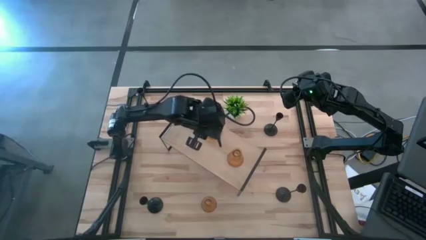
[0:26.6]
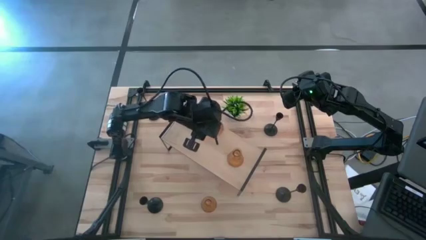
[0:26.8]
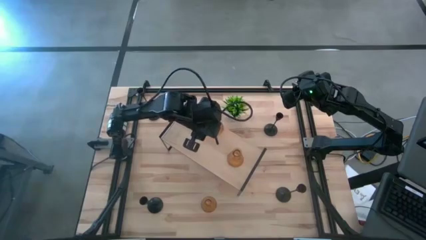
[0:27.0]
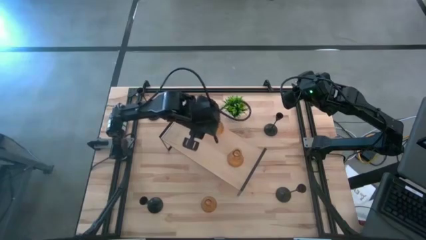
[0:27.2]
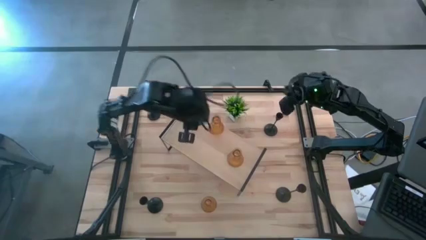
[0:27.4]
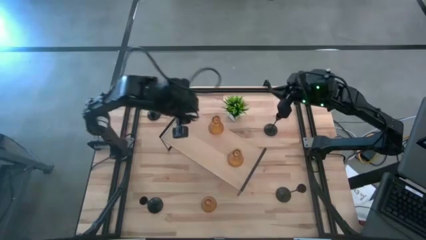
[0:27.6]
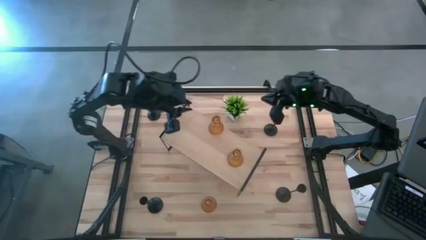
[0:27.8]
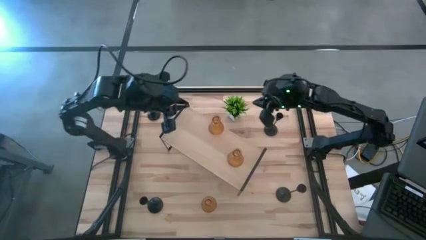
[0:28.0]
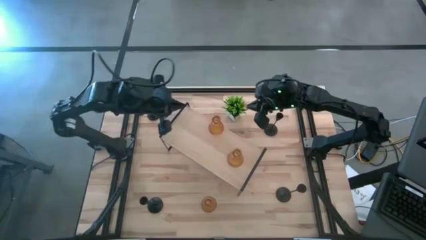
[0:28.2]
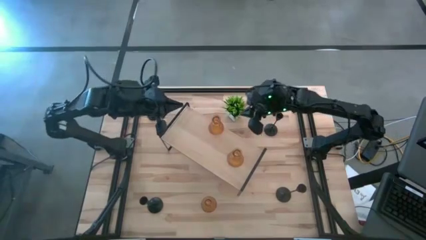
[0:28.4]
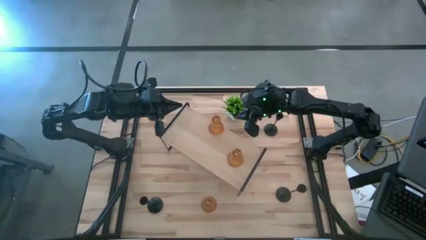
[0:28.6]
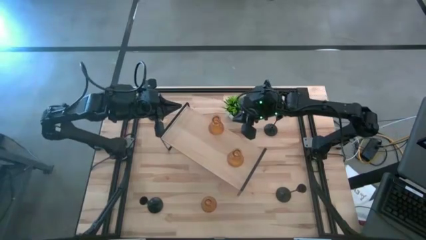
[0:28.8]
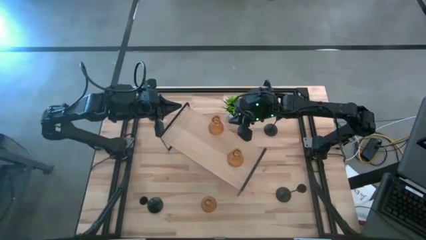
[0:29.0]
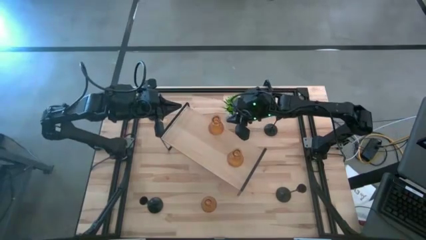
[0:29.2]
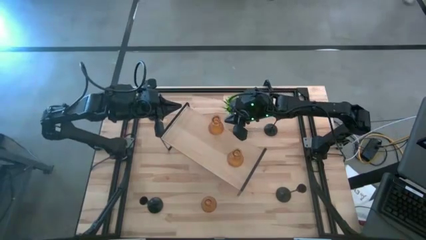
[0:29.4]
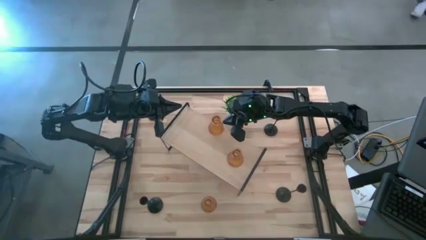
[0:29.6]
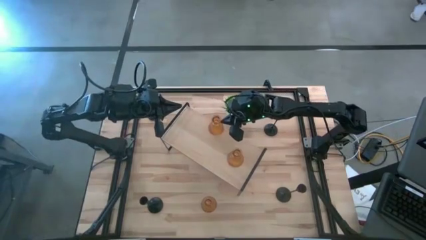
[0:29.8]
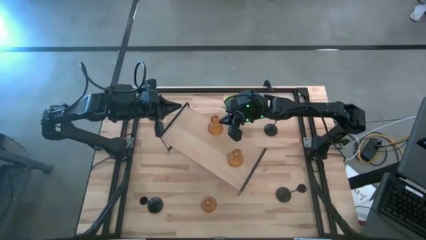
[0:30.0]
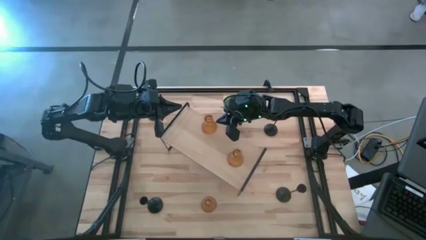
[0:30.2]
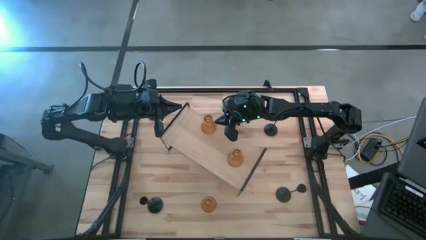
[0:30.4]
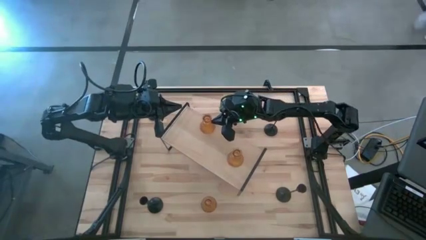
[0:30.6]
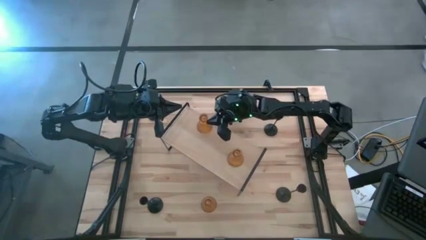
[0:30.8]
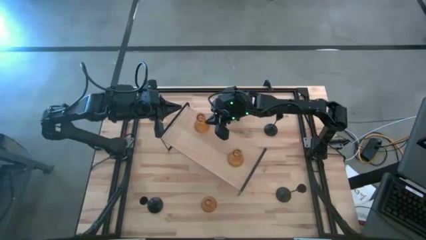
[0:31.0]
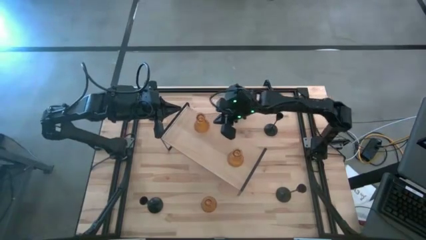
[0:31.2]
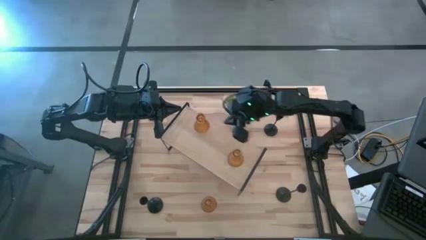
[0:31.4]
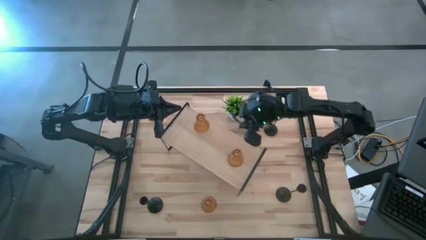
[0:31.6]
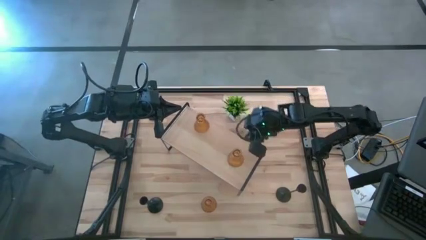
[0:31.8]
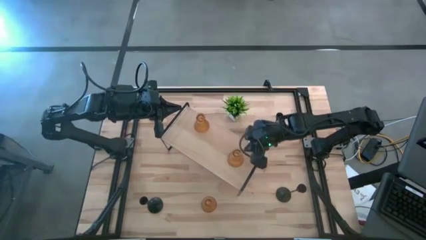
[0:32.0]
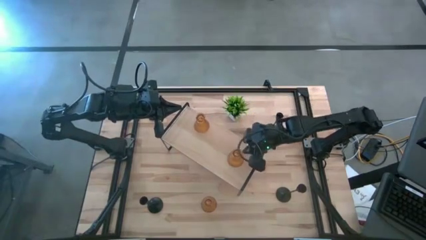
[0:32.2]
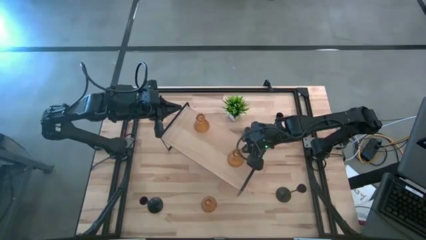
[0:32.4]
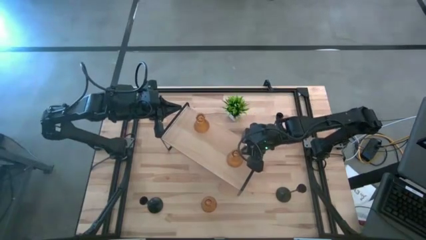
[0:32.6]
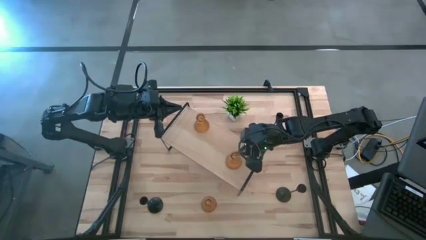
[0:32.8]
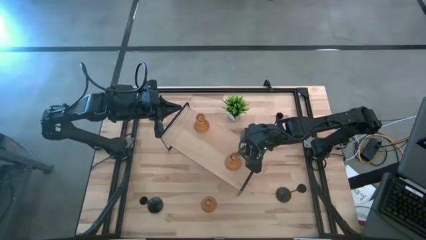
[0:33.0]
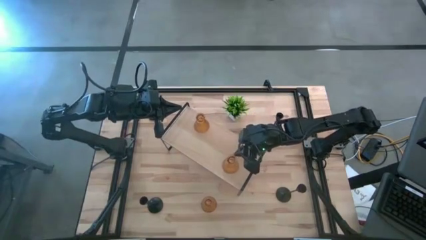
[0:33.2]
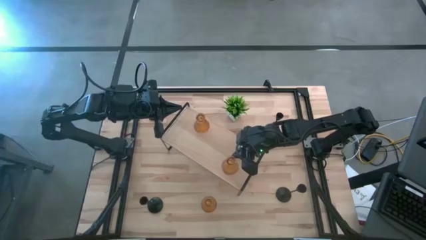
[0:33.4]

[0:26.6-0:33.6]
Task: Pick & Place candle stick holders
Adjust the orange candle holders on the shelf

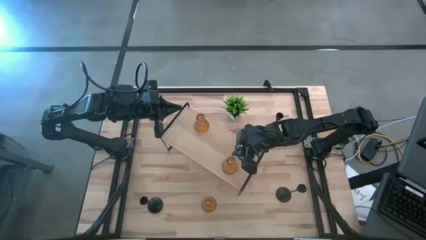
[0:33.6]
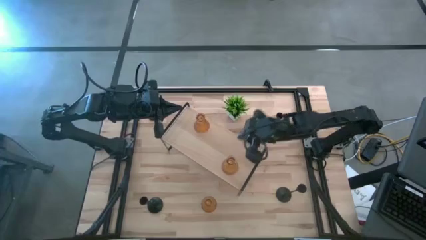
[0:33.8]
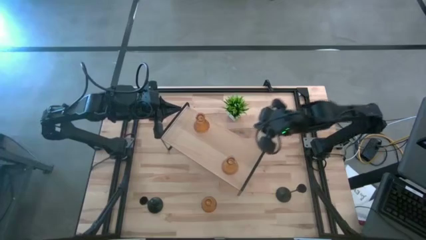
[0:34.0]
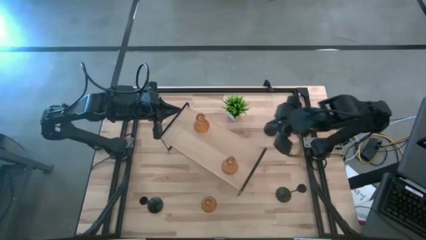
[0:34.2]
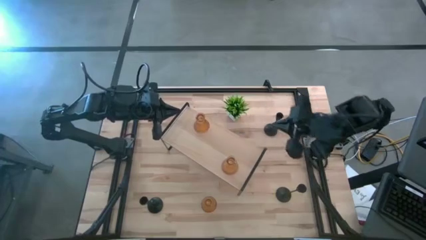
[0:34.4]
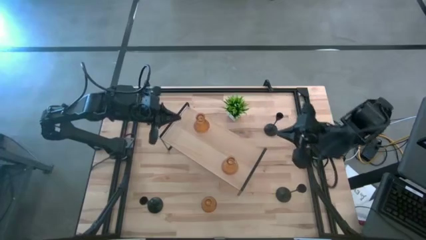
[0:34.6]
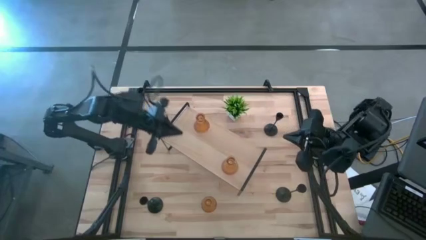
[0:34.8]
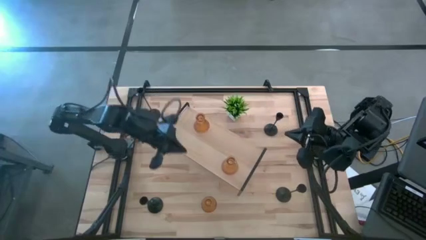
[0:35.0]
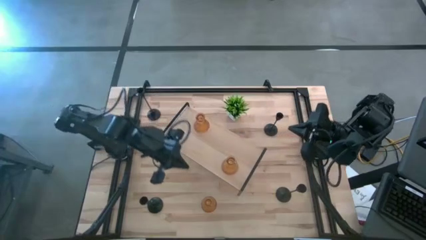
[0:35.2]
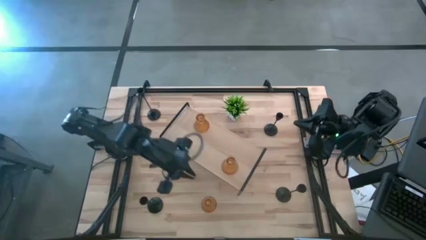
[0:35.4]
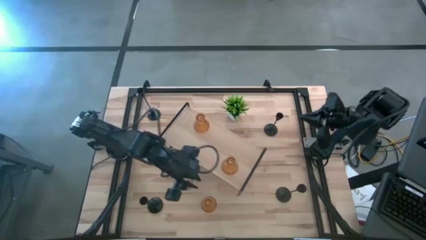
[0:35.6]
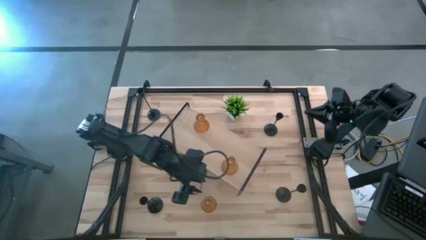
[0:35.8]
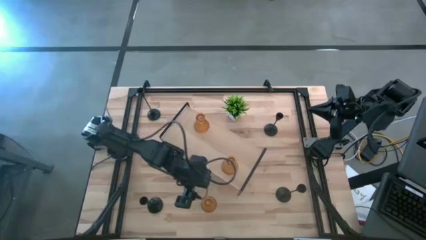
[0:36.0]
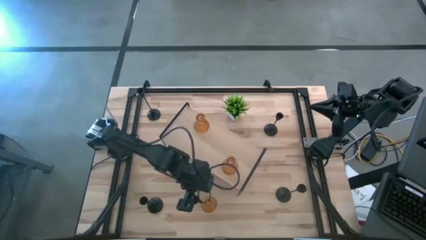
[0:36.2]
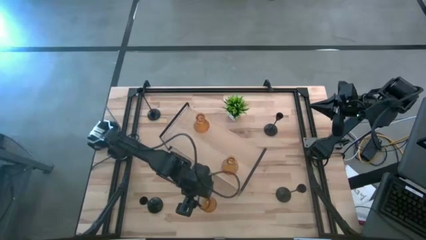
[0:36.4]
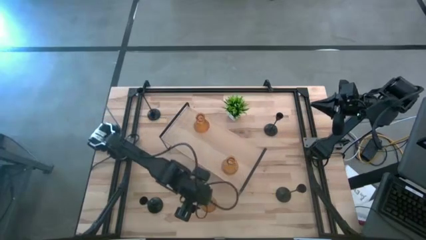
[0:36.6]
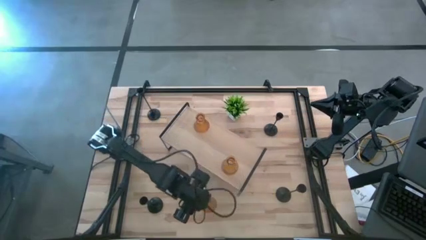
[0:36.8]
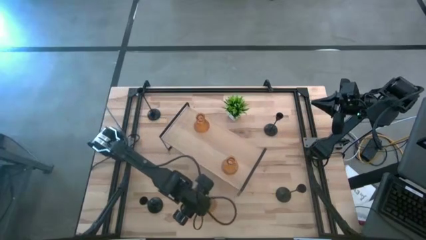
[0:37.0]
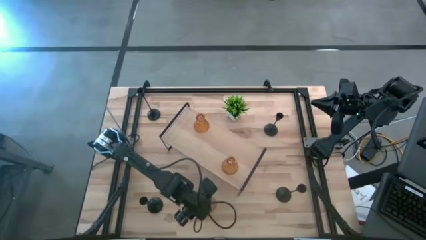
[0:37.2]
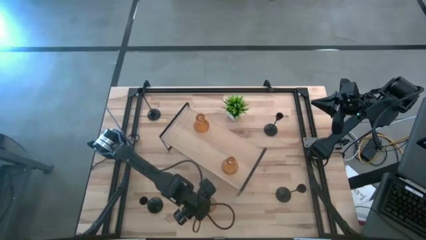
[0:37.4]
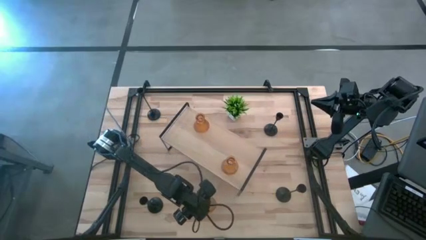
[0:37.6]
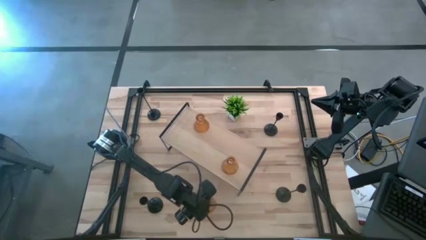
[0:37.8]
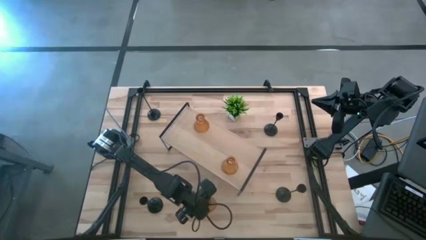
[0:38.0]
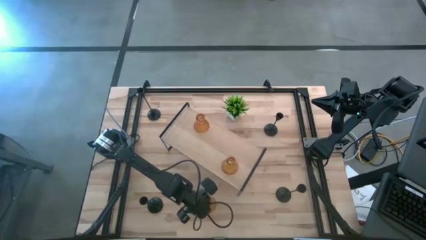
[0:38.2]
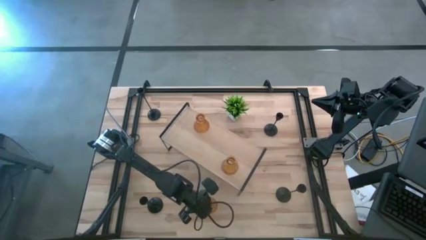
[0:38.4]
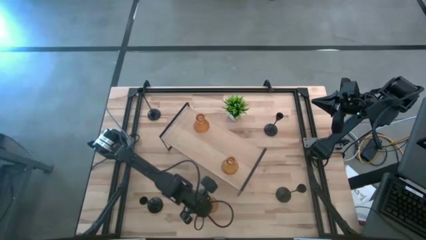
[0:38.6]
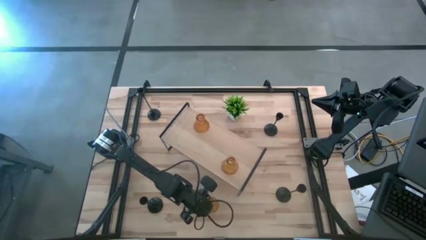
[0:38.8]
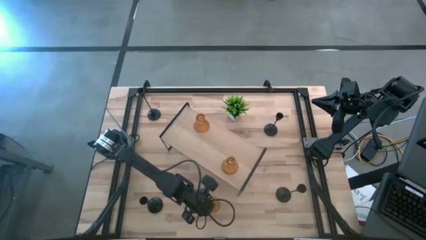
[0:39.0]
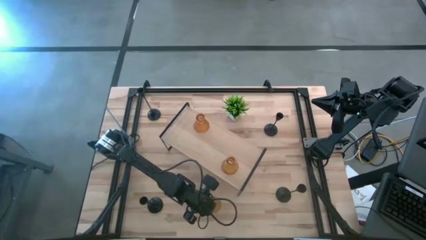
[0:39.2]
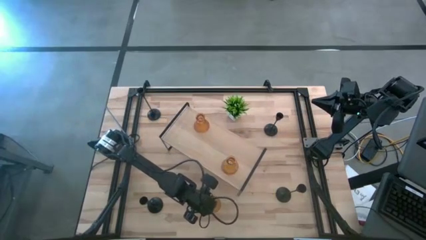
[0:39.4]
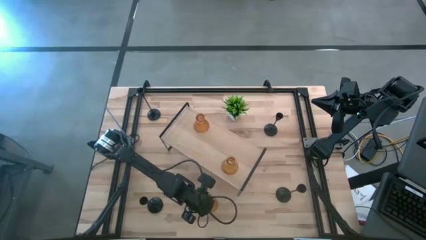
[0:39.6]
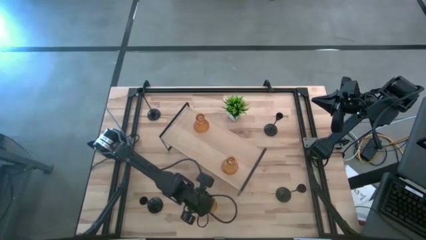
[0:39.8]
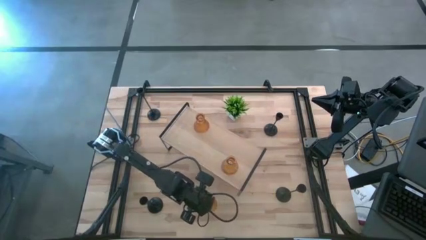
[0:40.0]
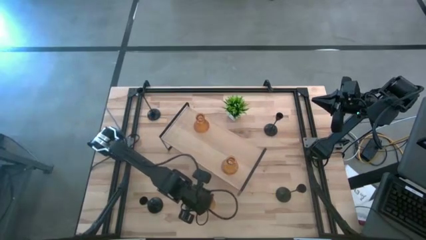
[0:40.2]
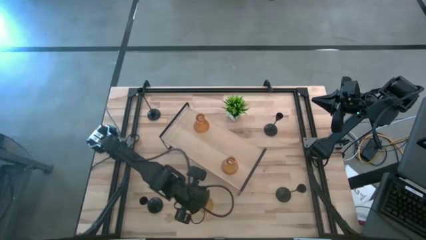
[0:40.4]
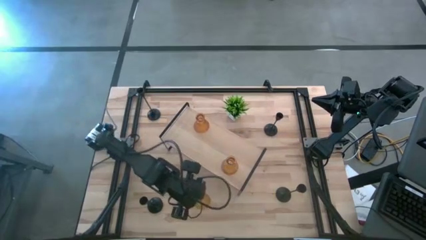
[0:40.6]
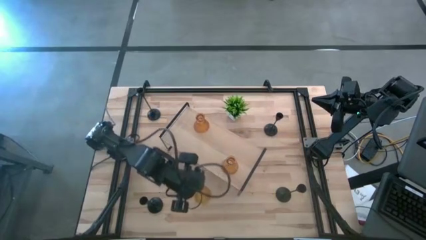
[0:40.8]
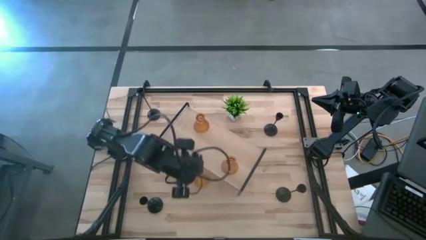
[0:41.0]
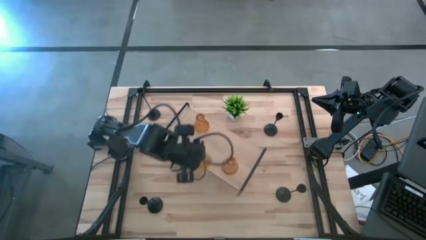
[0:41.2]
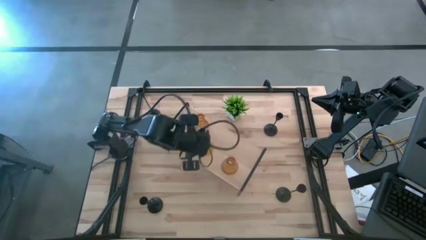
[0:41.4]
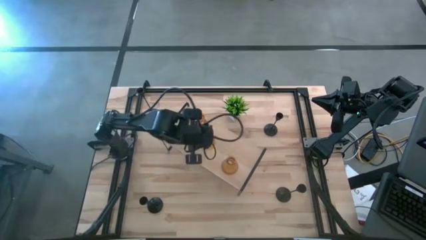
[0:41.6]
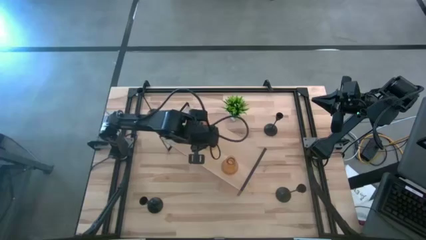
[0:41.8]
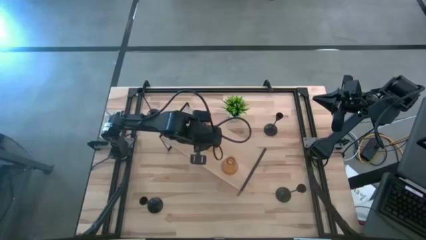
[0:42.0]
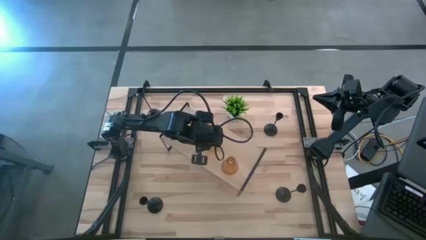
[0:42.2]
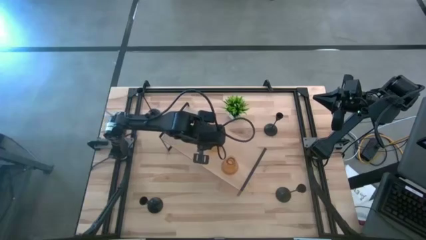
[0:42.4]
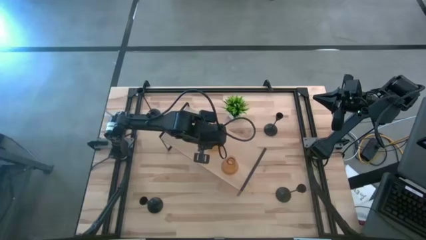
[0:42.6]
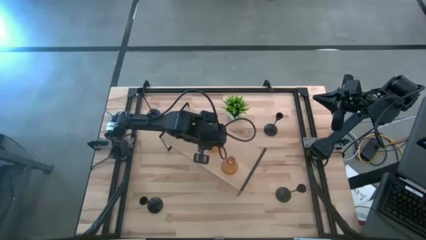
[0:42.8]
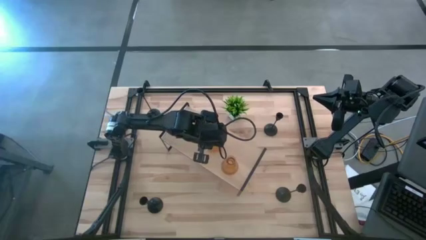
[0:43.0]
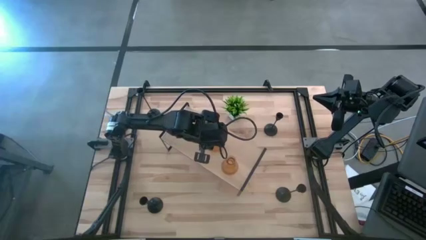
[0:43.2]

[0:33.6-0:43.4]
Put the orange candle holder on the shelf
